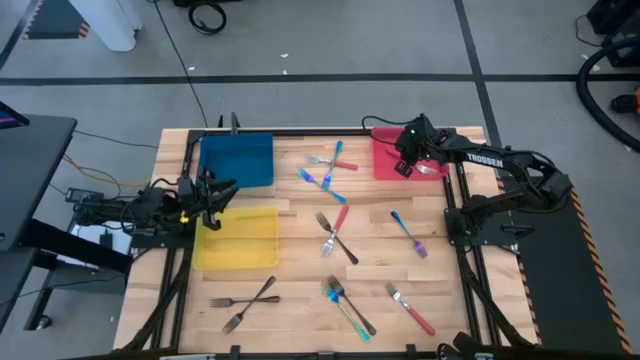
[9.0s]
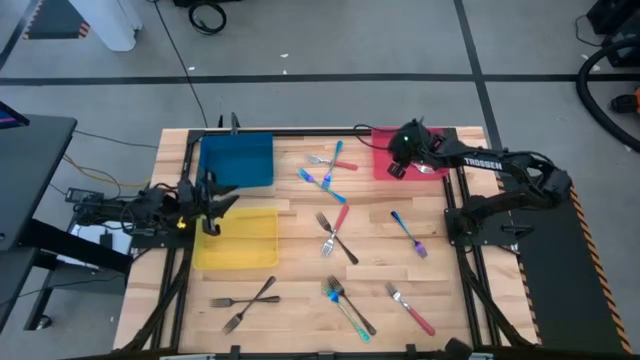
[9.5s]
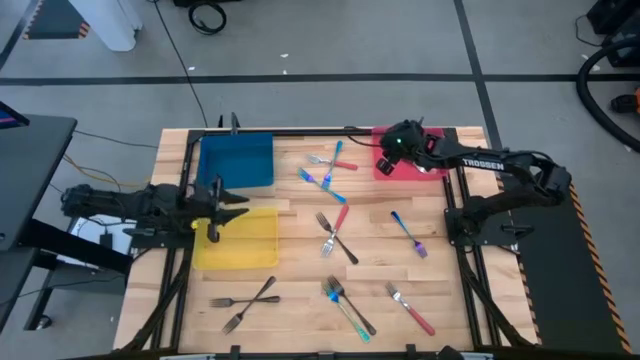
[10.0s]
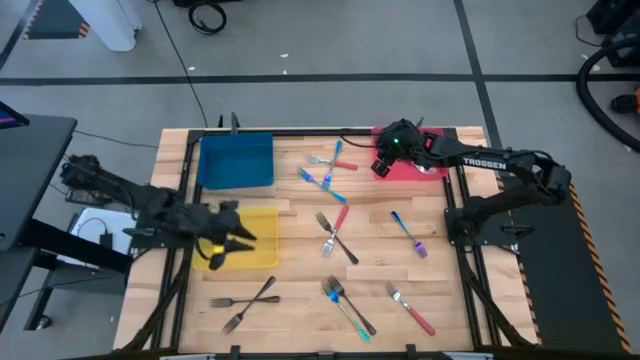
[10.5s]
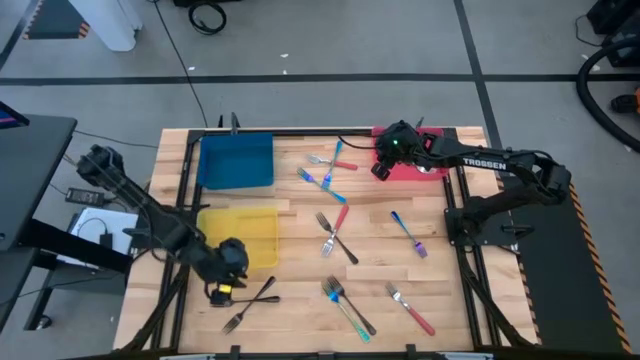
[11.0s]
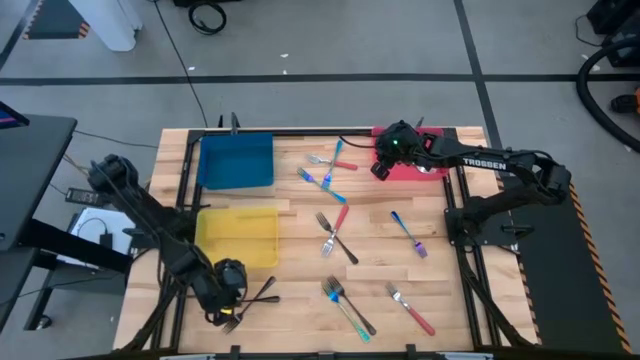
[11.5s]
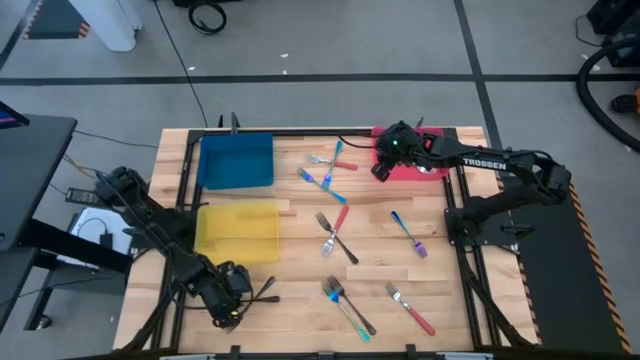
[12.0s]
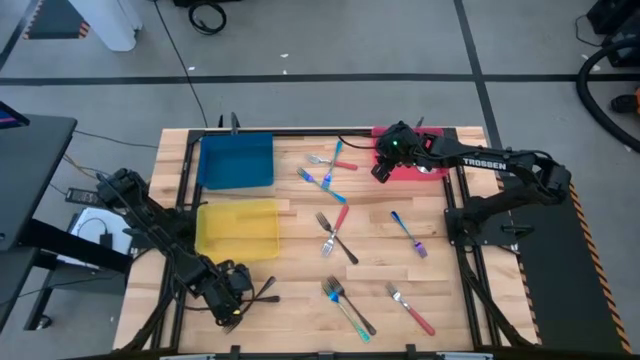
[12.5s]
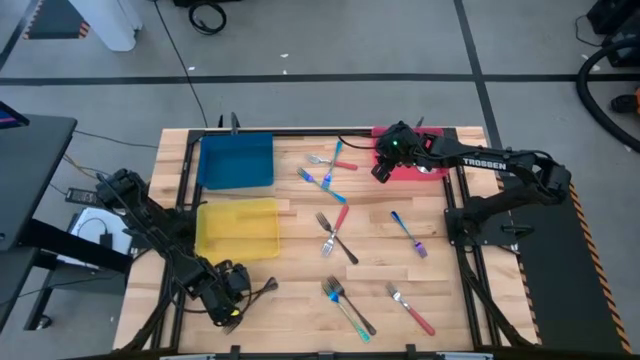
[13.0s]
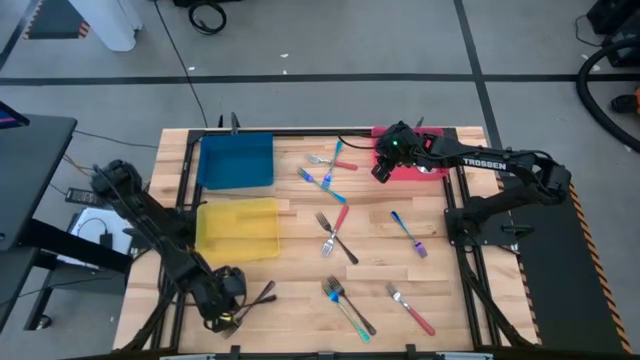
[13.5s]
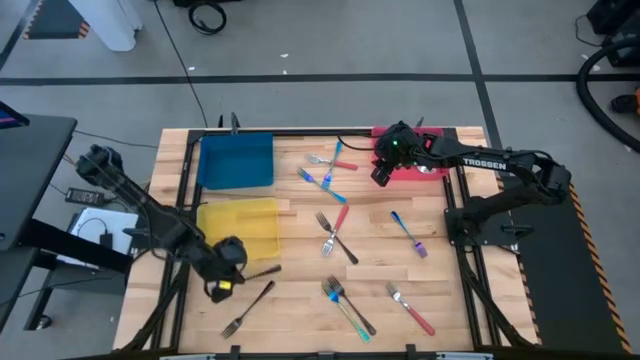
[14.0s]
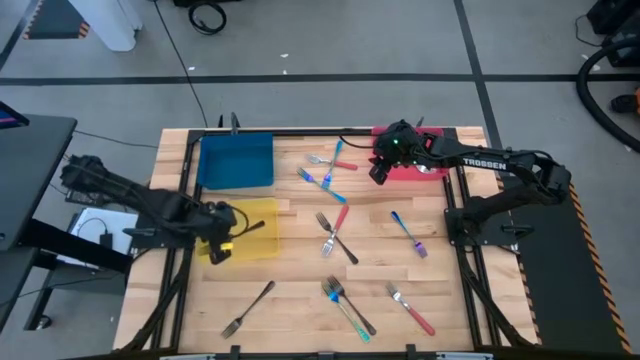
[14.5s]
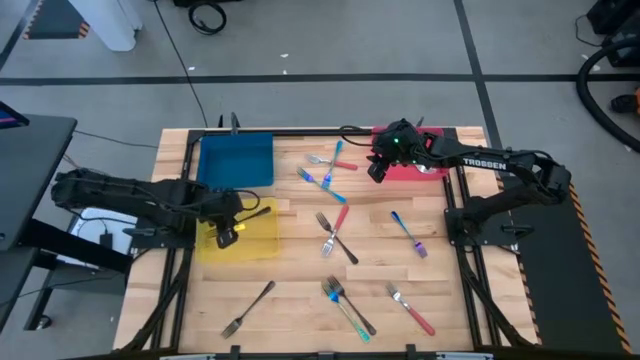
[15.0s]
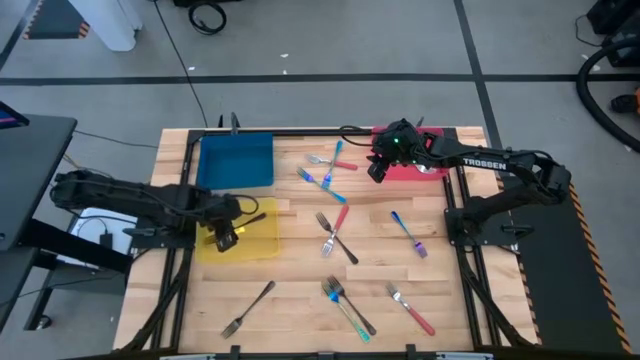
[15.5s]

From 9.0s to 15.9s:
Task: Sort silverware by color (type)
Put the black fork into the yellow bin

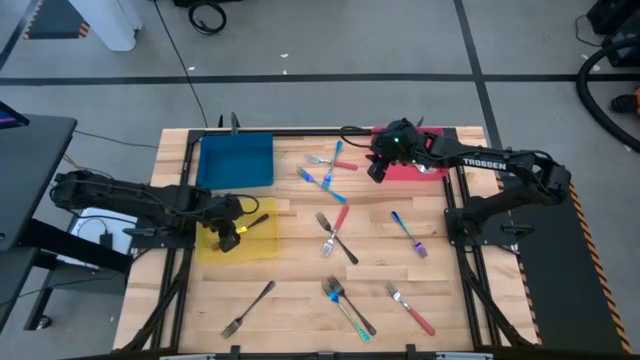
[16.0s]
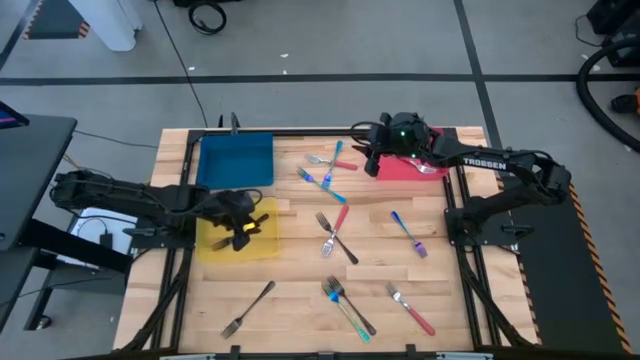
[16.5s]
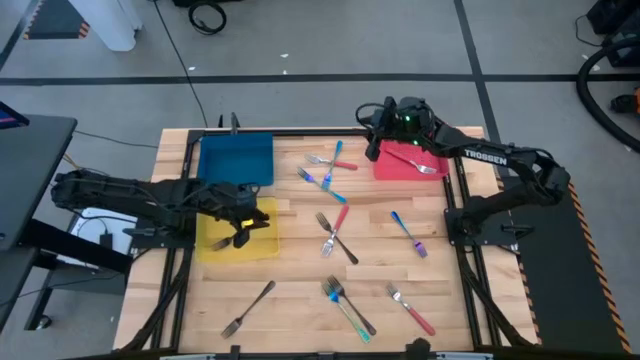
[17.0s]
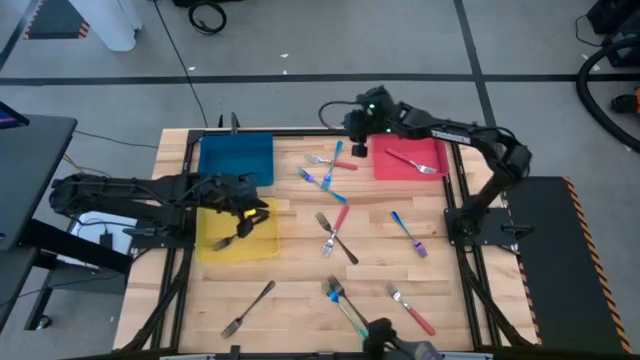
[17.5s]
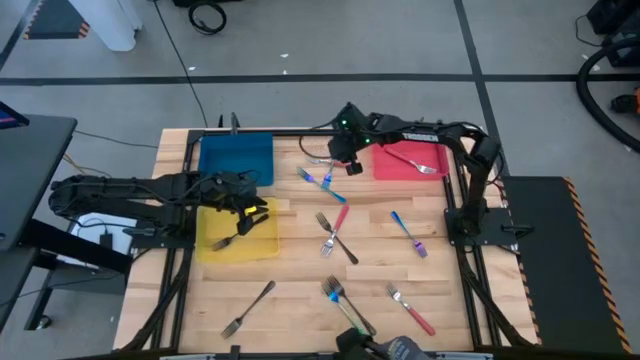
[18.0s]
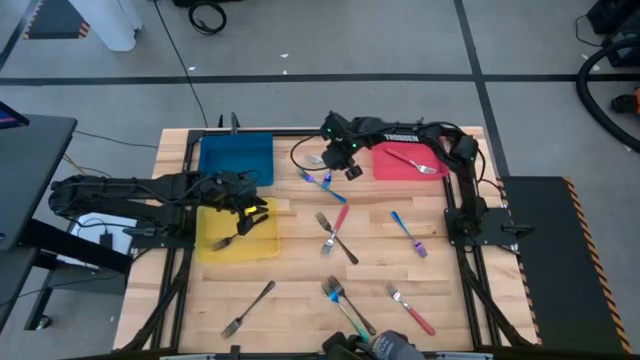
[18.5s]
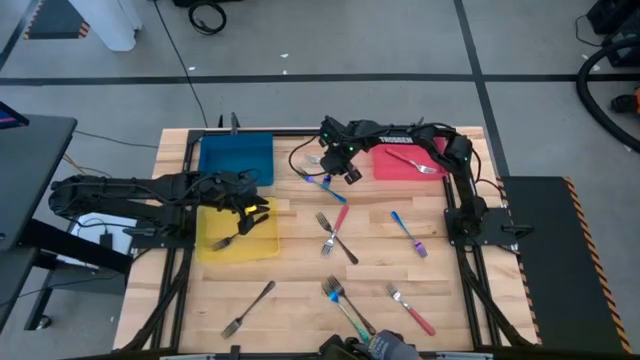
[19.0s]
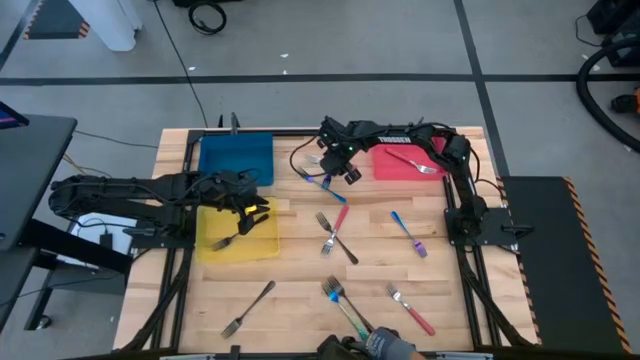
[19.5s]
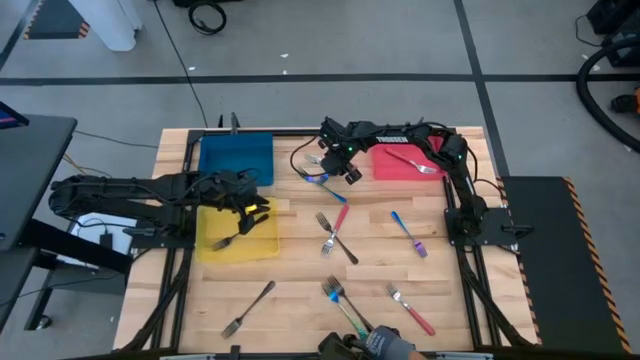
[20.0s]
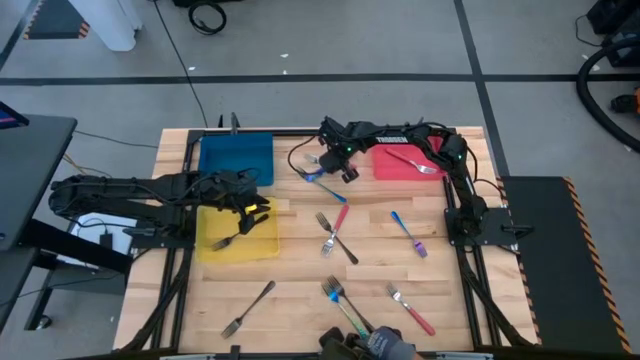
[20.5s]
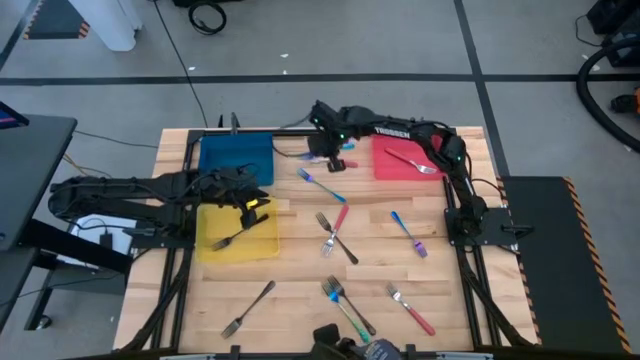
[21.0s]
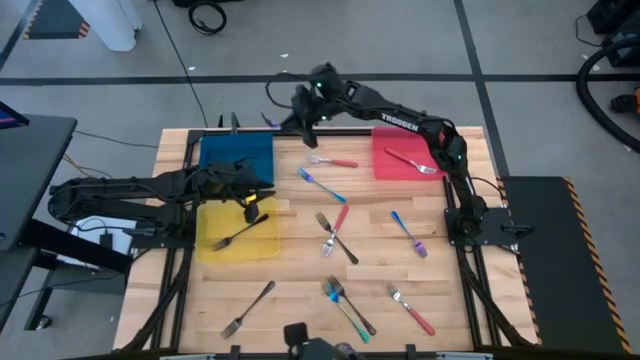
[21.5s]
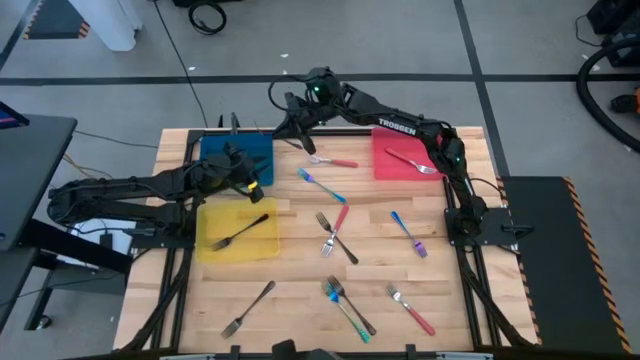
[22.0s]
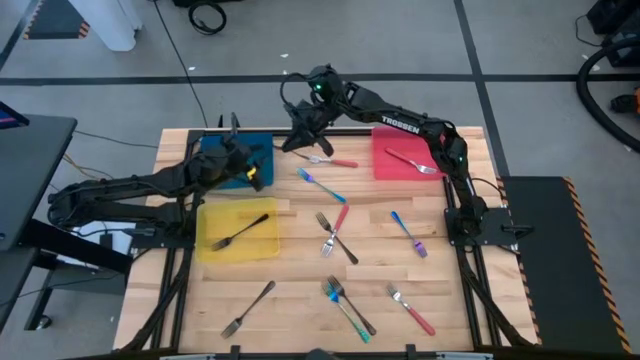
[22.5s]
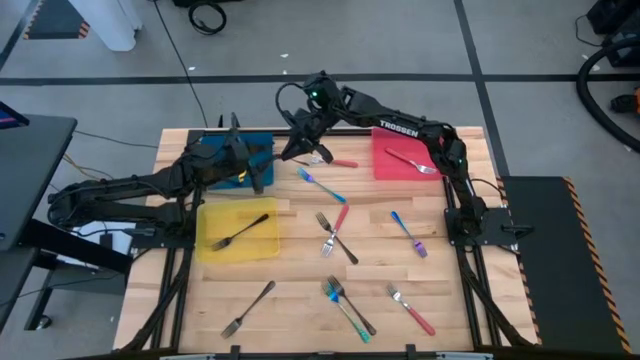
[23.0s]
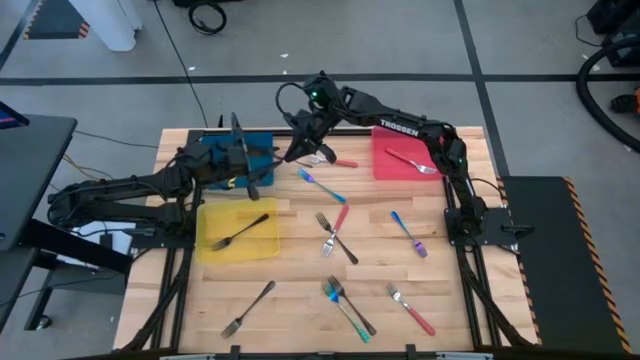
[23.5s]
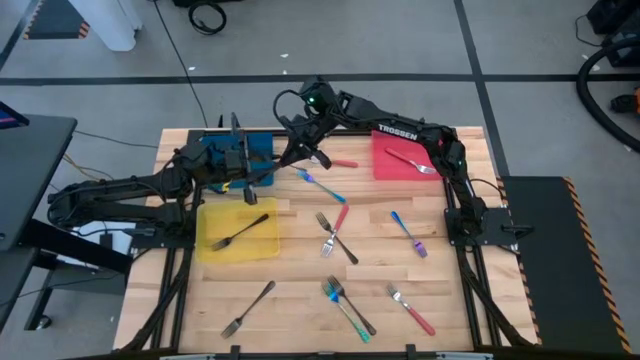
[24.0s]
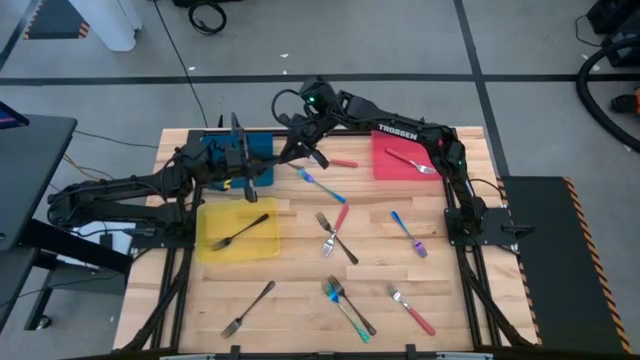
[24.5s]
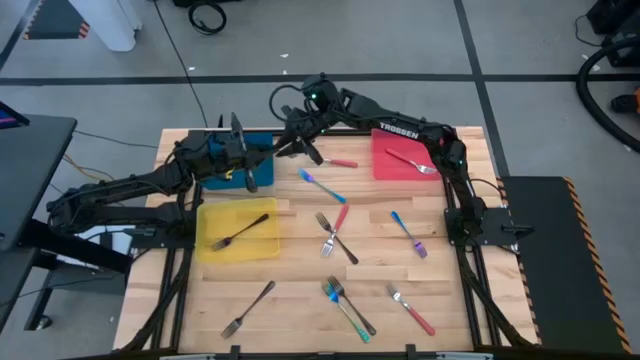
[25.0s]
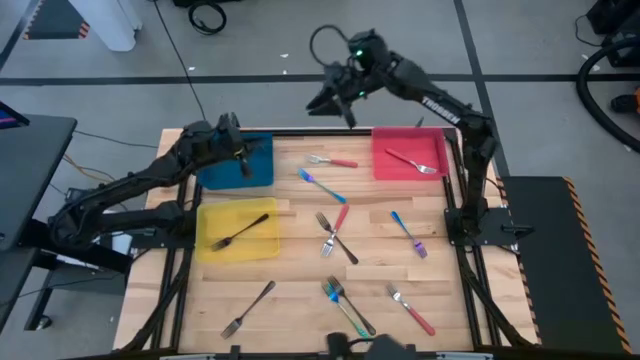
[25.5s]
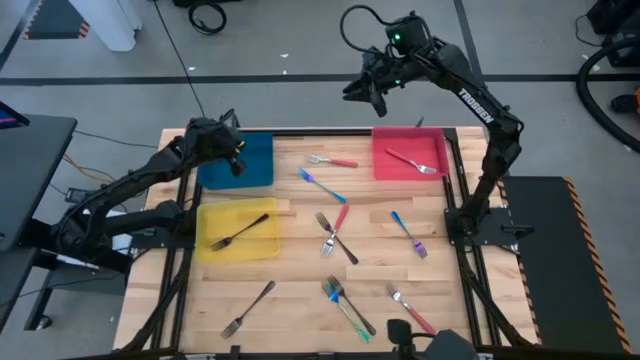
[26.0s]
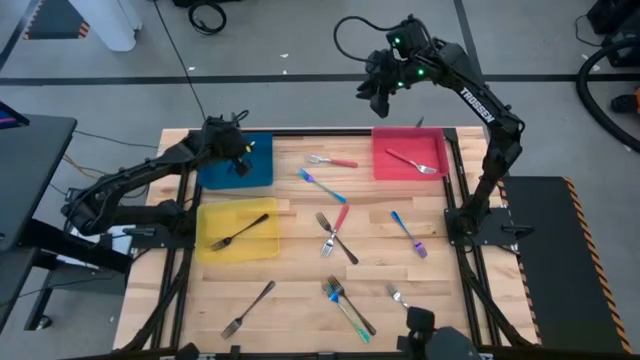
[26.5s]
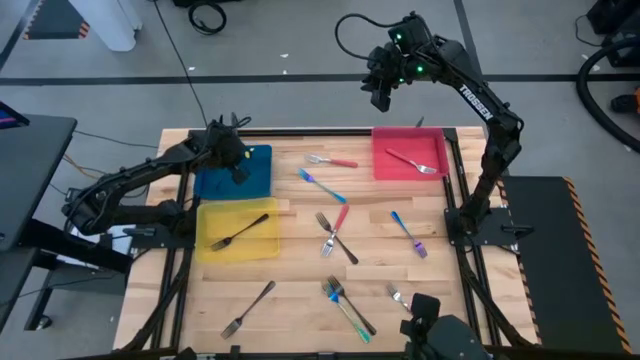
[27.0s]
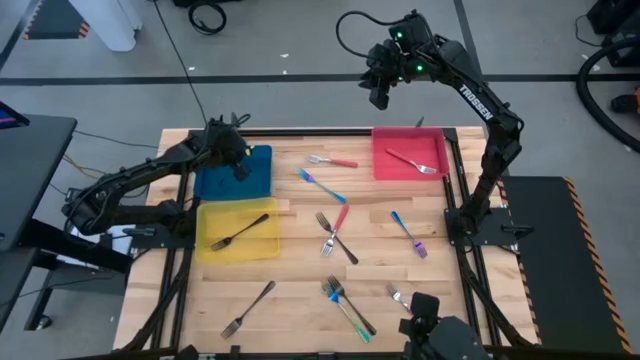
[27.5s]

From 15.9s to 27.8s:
Put the blue fork into the blue bin

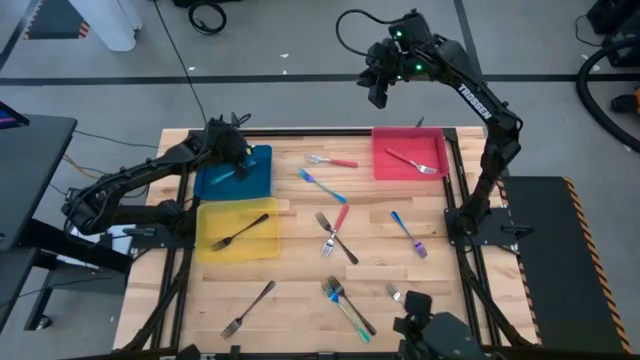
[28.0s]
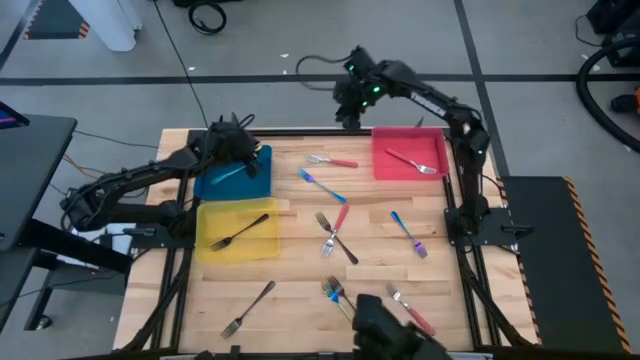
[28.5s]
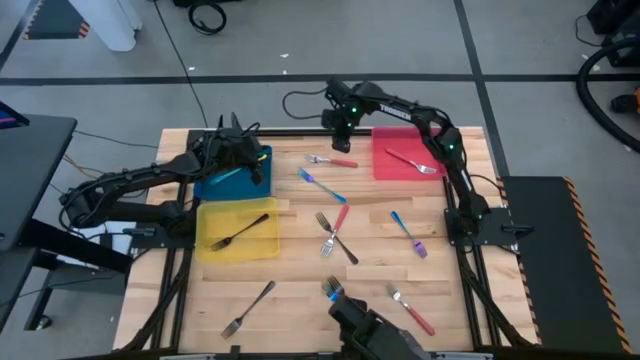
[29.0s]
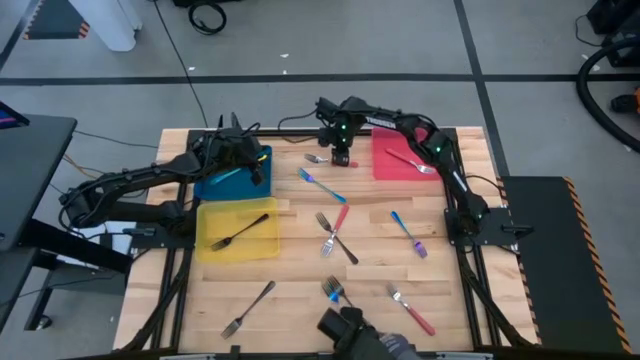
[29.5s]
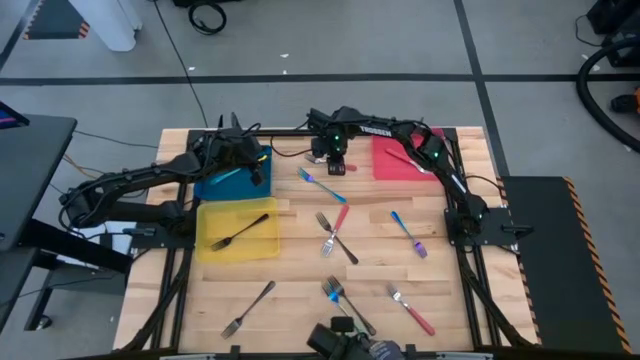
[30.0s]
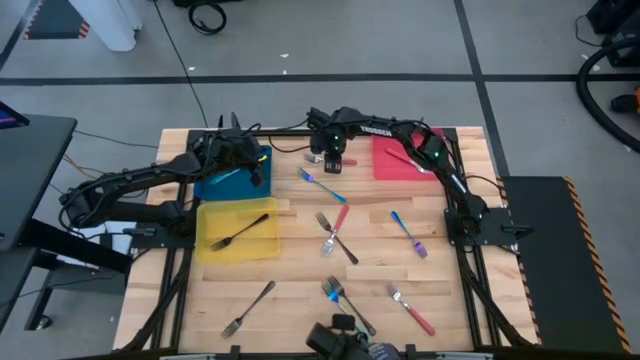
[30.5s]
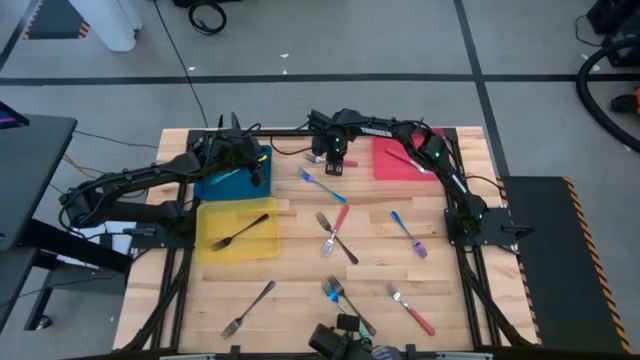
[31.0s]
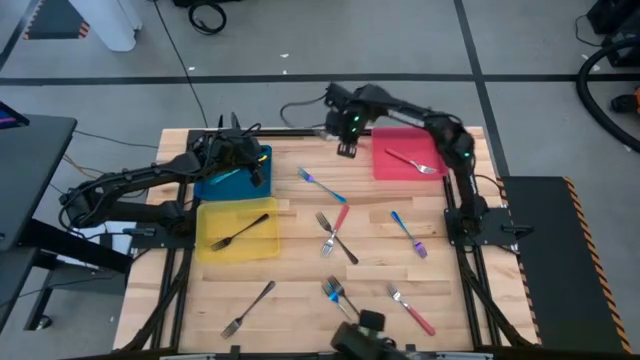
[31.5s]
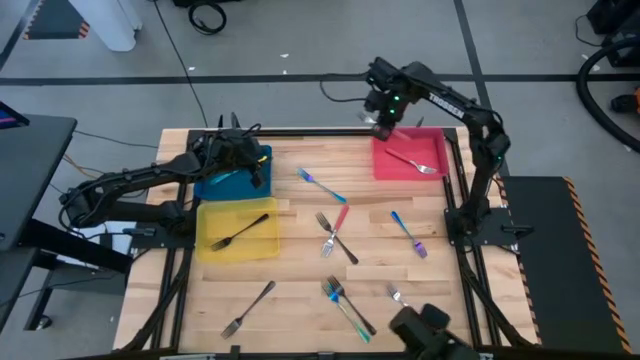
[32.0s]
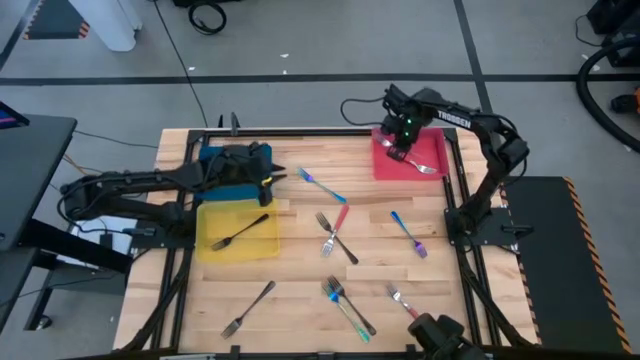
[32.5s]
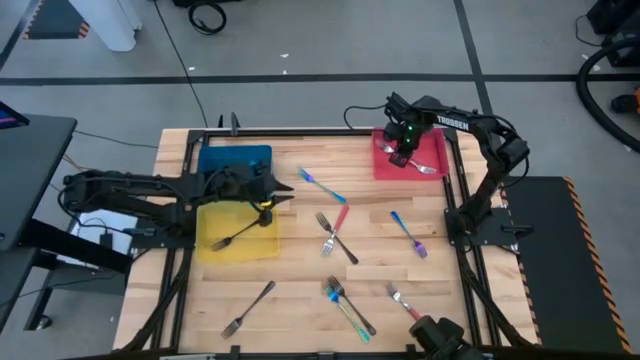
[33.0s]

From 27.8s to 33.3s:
Put the red fork into the red bin
